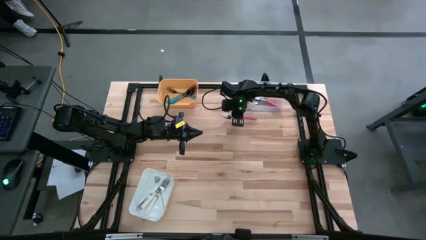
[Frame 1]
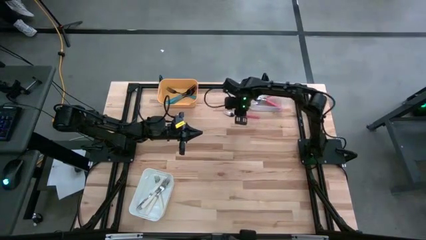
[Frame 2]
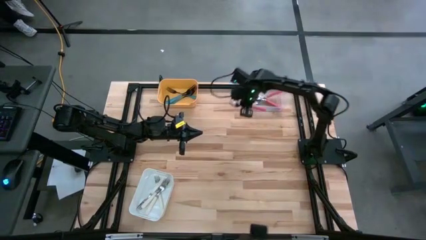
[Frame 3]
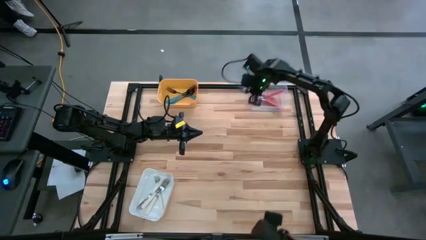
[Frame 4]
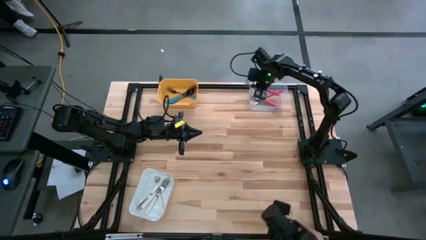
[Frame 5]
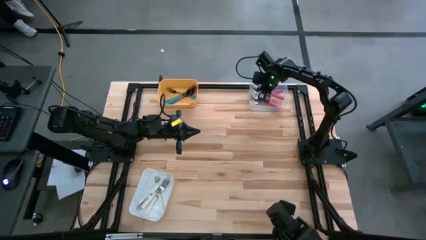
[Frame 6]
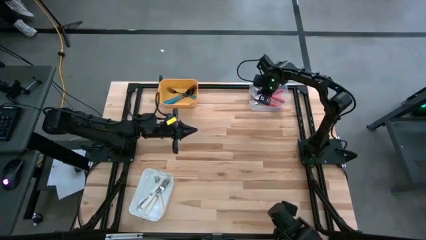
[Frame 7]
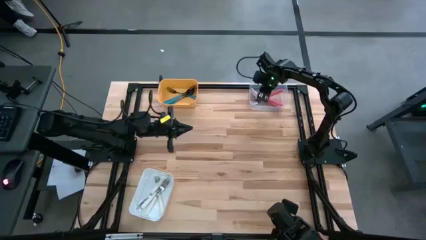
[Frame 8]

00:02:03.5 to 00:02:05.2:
Task: Sort silverware by color (type)
Put the pink fork into the transparent bin

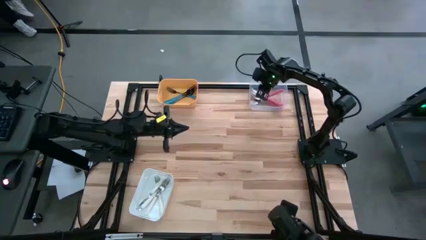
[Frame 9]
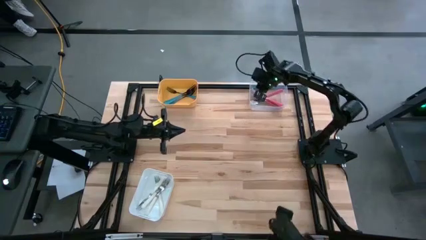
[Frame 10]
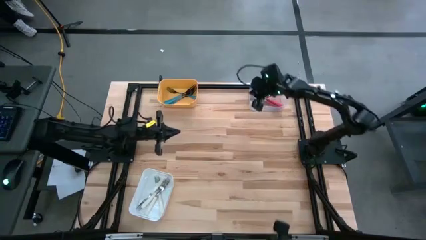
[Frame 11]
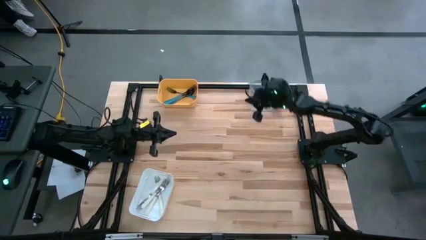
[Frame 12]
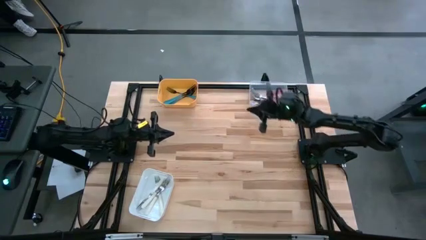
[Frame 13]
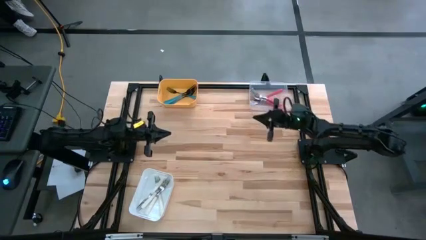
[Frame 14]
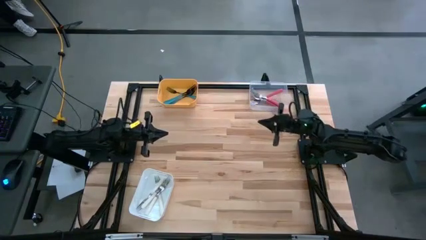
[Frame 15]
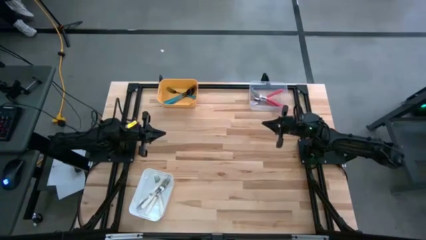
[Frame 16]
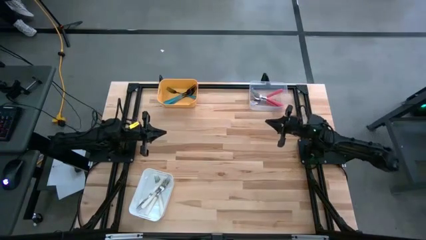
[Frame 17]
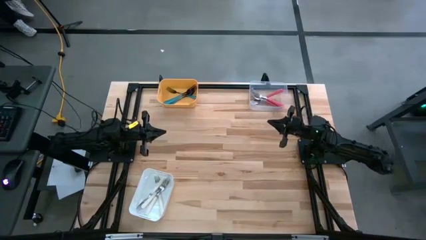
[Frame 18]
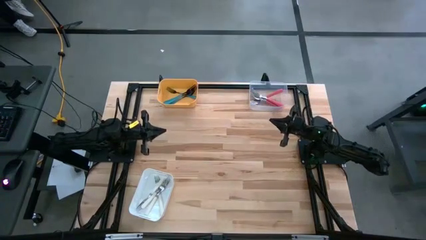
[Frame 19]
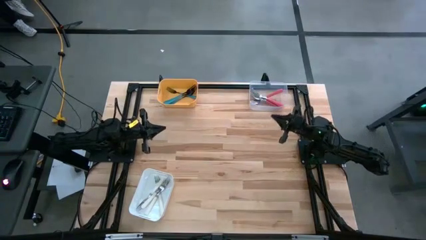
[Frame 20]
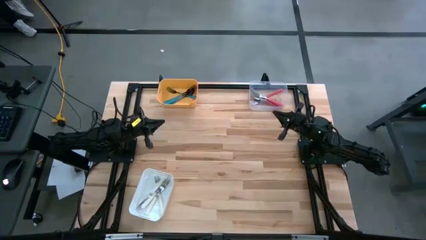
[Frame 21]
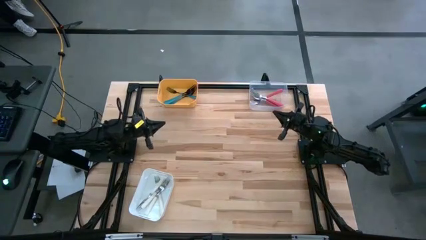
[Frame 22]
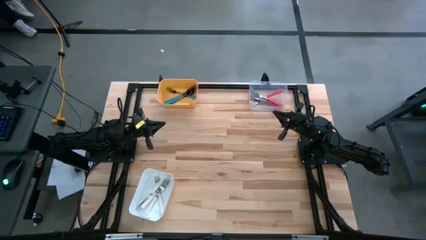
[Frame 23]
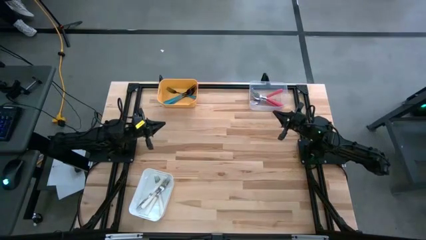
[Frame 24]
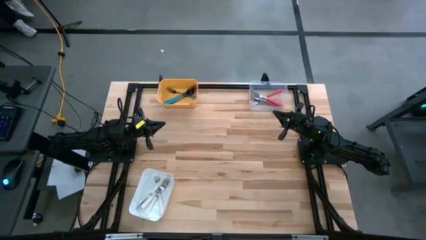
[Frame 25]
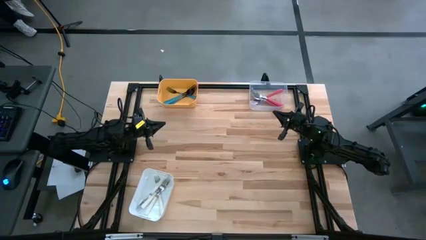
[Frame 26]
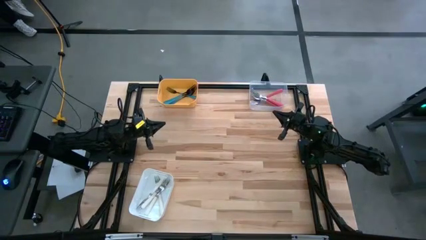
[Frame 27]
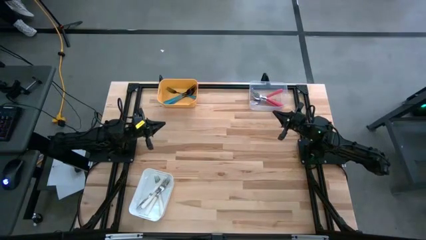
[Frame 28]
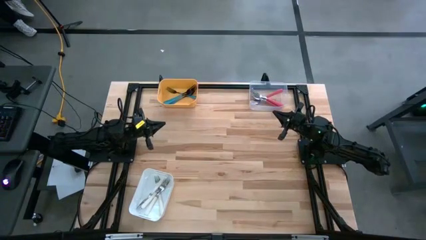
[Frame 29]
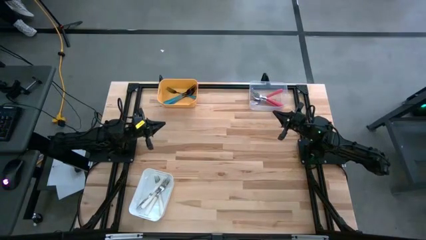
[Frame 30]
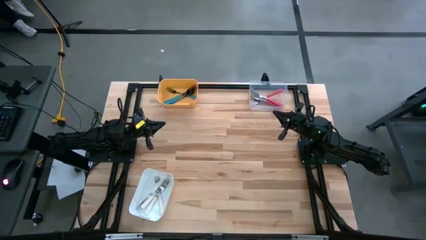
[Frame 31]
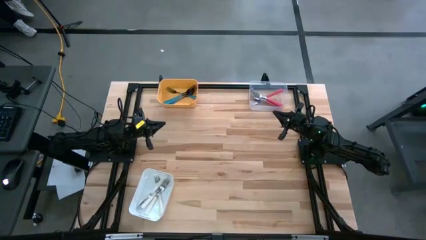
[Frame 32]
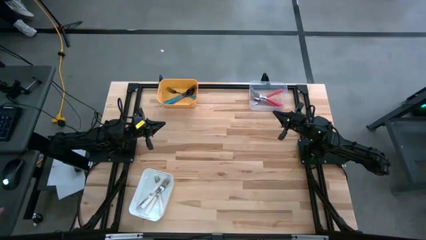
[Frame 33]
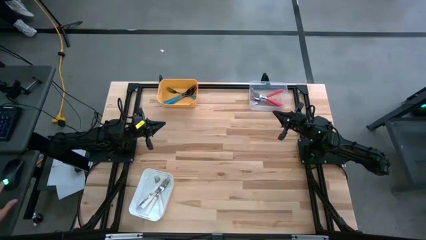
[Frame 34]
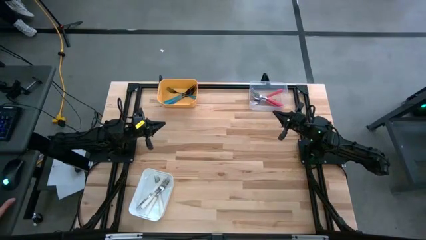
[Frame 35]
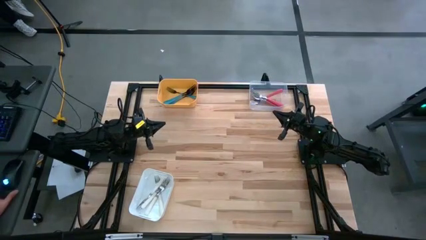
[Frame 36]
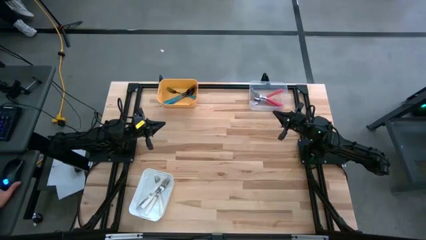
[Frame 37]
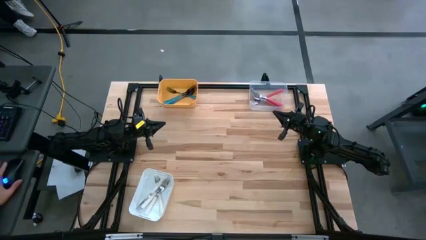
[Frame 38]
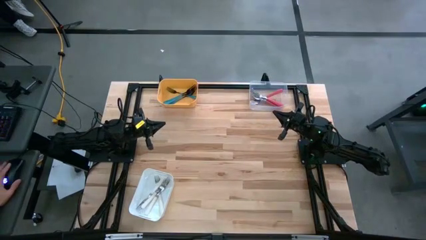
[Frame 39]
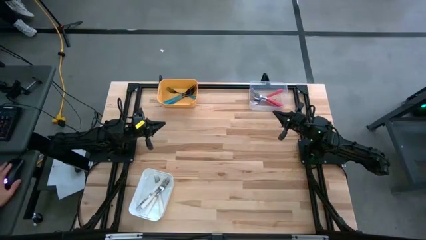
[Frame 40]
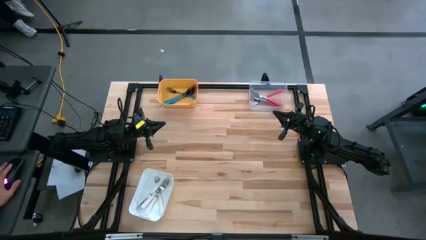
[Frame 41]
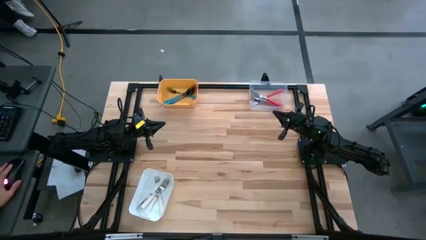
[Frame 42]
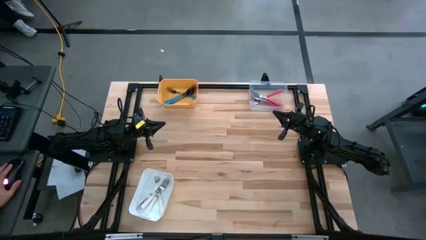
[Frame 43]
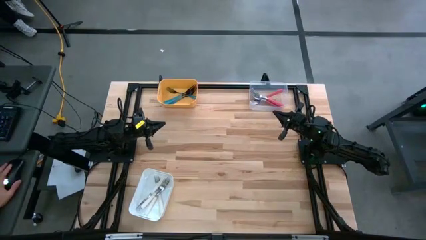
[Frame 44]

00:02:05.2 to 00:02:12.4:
Return to Home Position

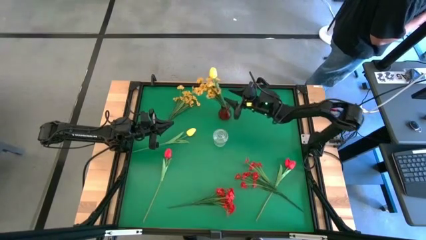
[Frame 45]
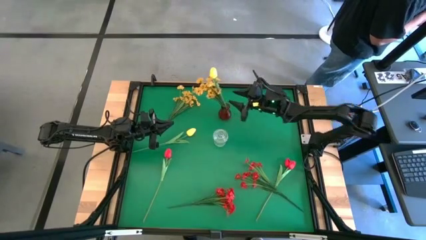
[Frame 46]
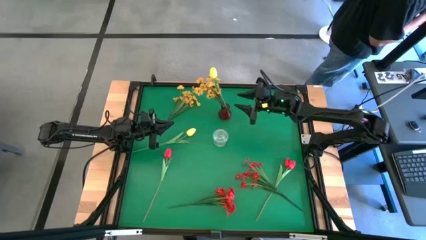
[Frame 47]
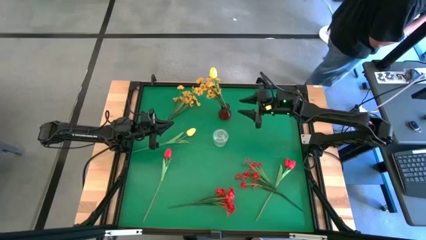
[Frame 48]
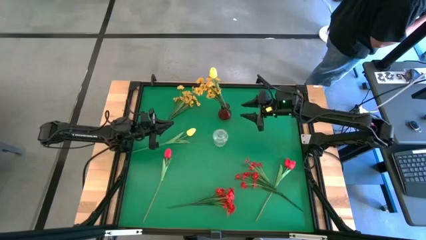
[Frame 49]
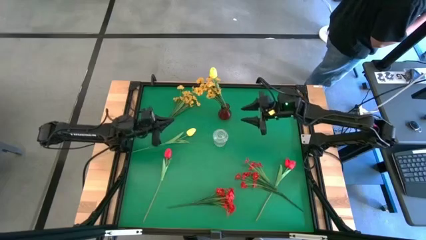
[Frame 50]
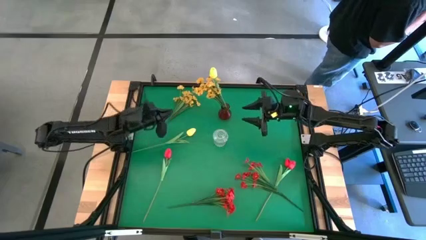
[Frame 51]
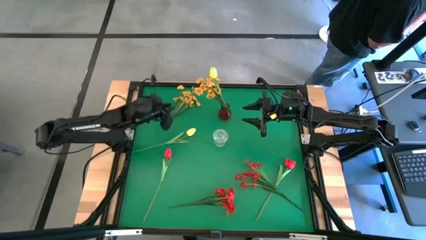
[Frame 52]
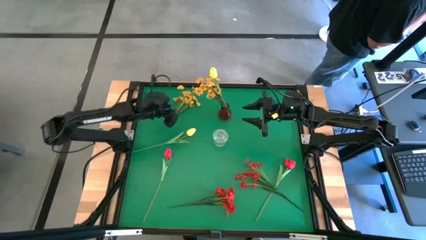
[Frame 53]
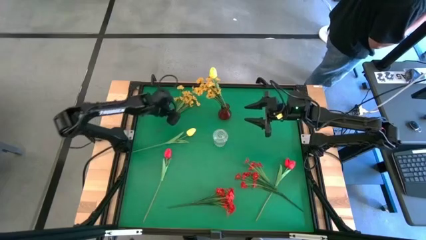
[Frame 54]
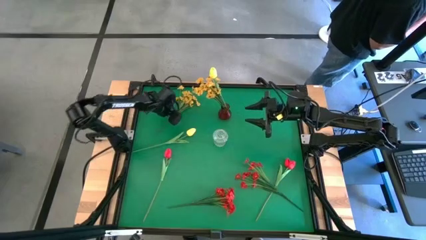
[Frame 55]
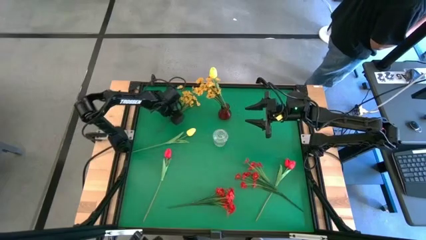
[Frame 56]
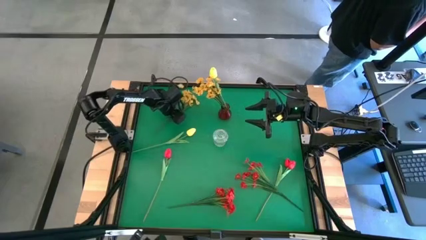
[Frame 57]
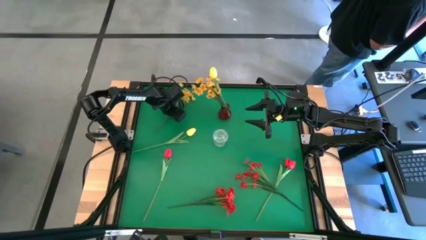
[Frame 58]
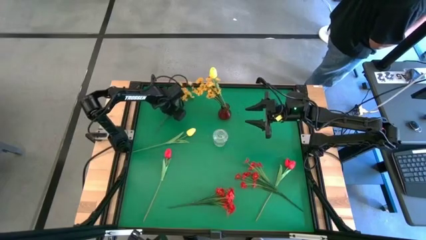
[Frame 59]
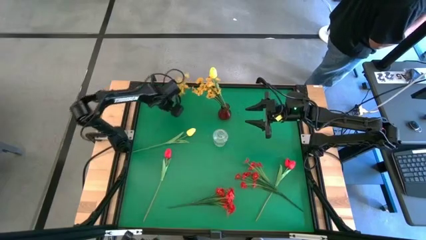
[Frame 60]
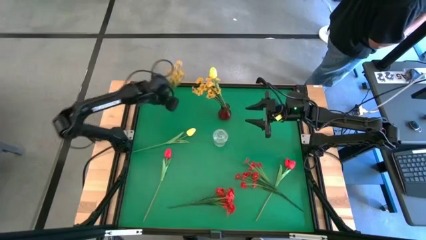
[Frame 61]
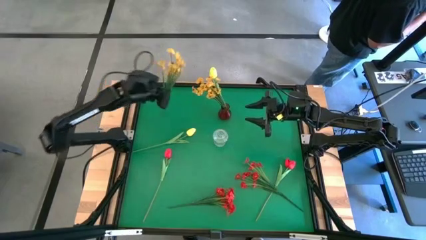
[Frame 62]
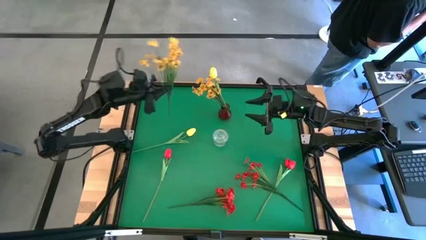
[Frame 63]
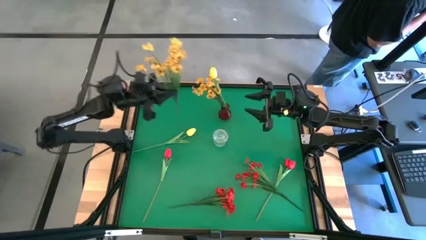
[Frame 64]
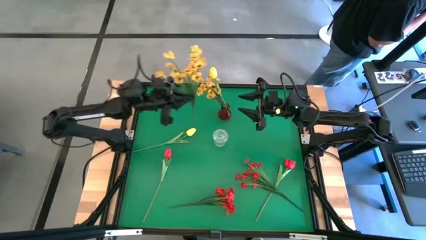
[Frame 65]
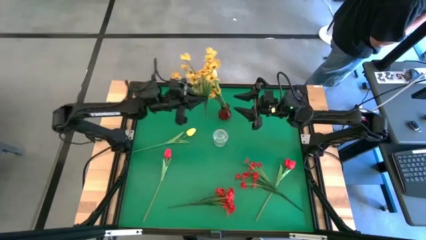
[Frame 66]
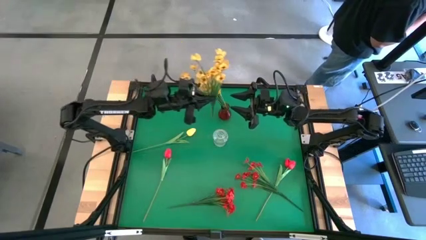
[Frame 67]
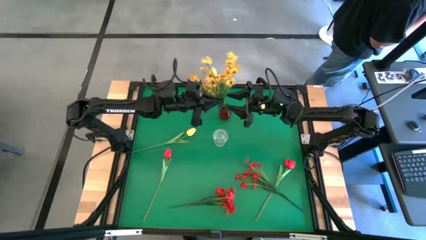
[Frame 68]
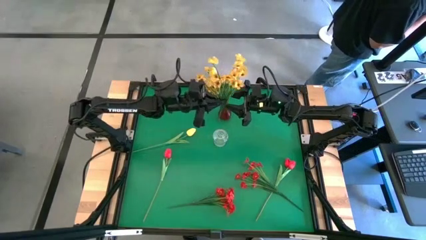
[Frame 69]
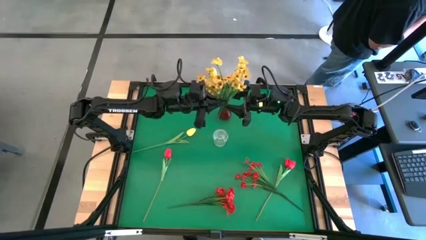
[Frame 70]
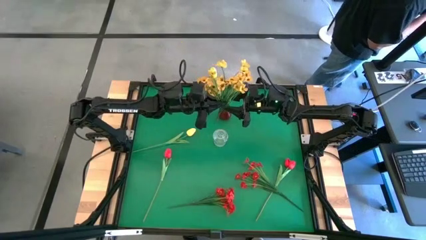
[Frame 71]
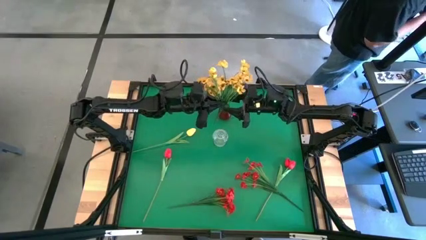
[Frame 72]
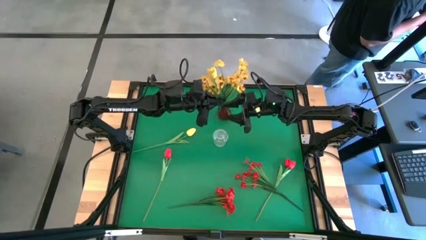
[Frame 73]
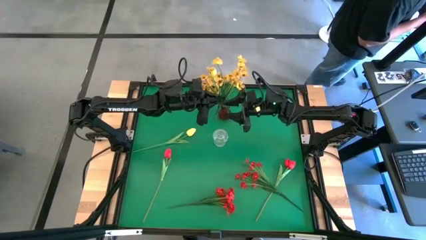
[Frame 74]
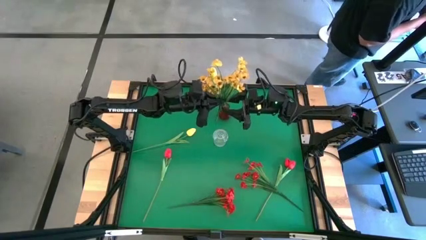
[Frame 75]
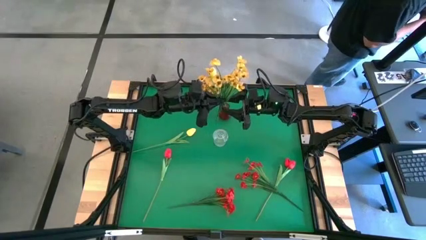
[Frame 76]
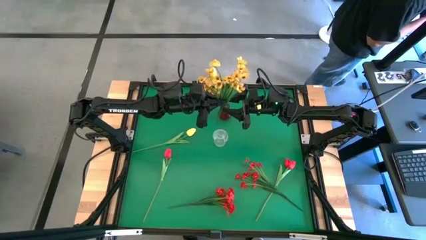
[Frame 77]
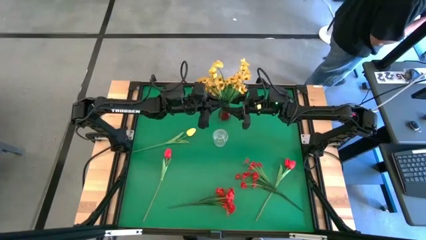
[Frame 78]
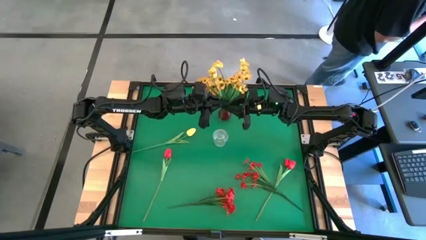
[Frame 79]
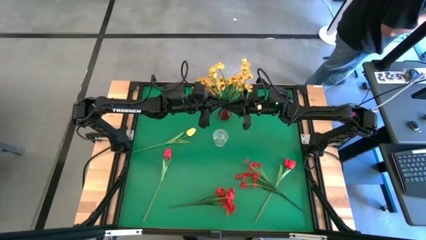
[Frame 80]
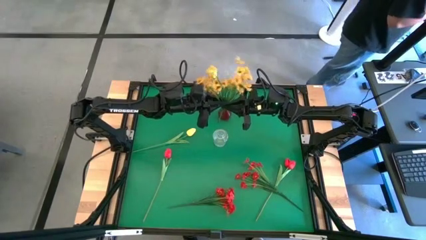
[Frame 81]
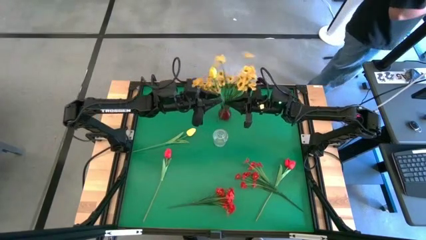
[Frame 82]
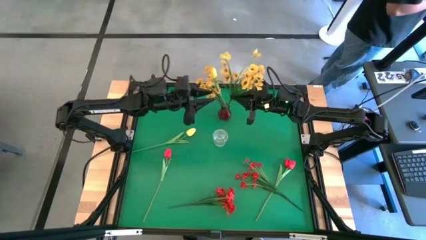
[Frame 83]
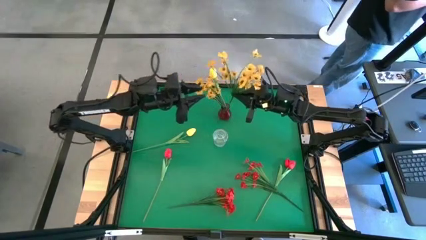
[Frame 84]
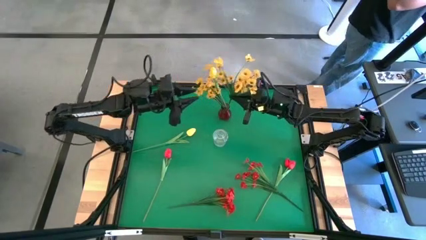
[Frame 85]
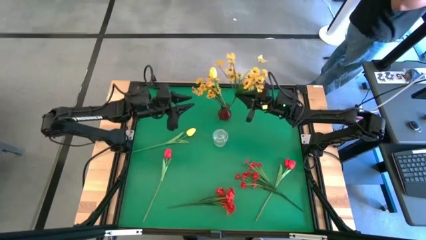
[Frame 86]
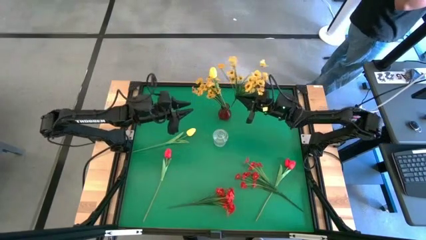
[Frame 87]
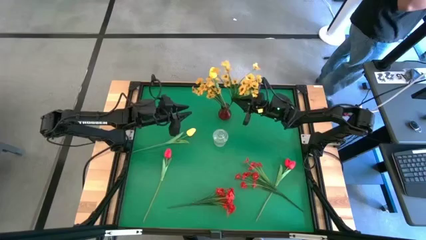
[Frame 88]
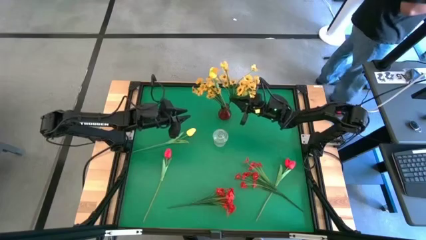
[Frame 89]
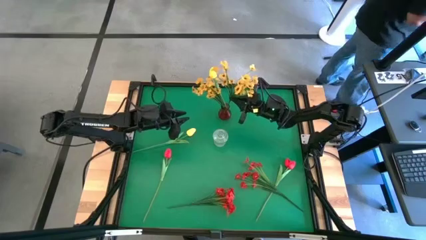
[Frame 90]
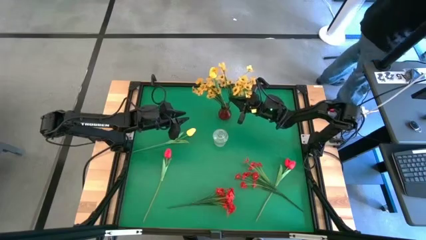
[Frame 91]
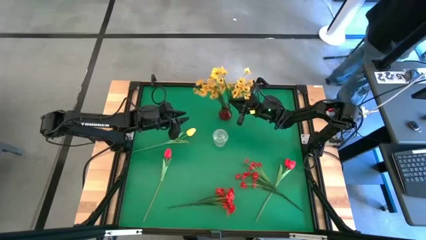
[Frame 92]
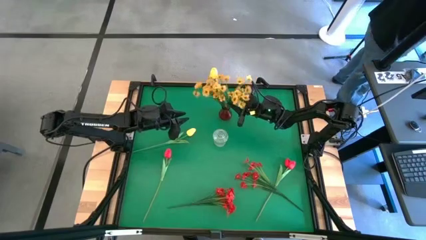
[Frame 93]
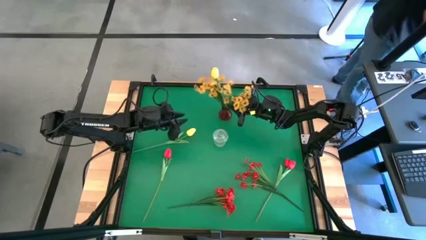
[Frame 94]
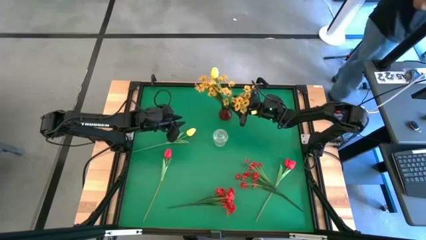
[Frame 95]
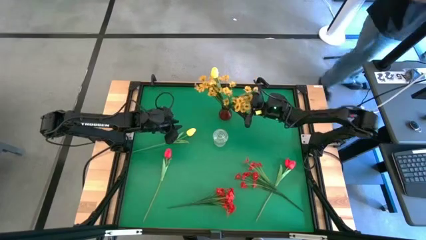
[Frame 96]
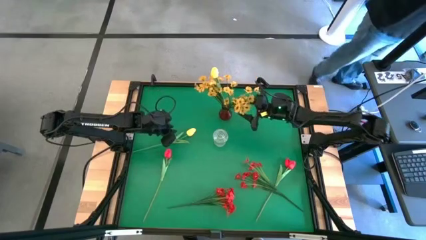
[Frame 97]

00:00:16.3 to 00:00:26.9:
Task: Sort flowers into vase by color
Put the yellow flowers into the red vase
